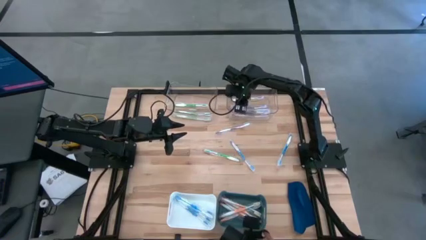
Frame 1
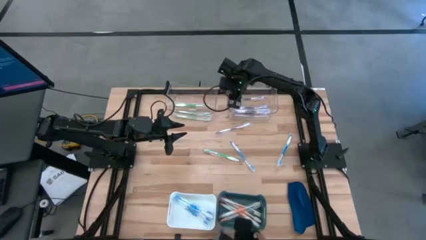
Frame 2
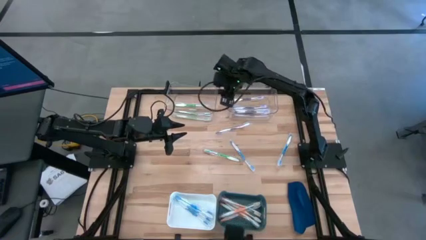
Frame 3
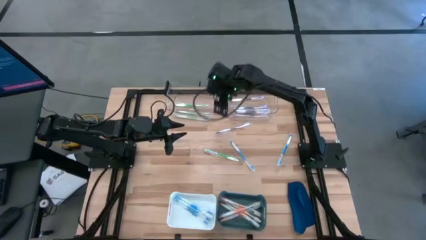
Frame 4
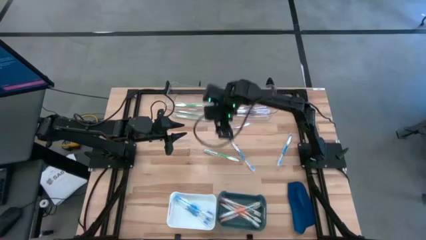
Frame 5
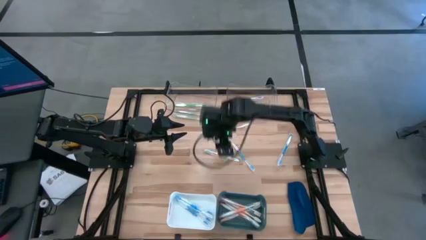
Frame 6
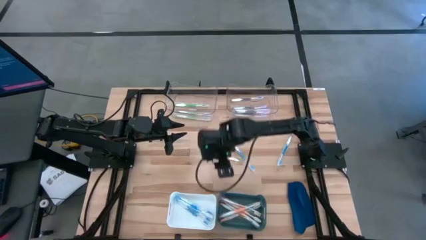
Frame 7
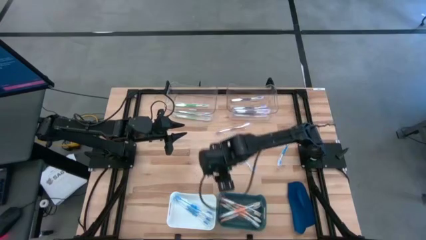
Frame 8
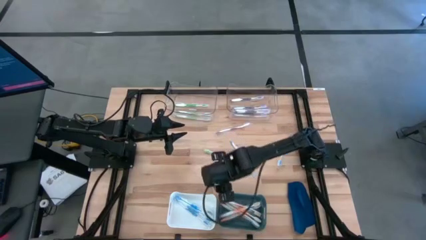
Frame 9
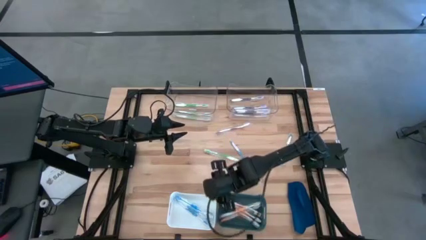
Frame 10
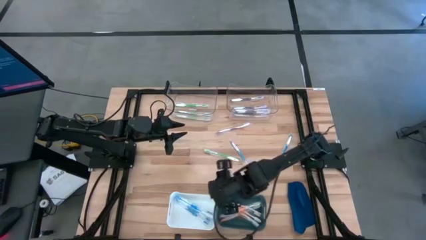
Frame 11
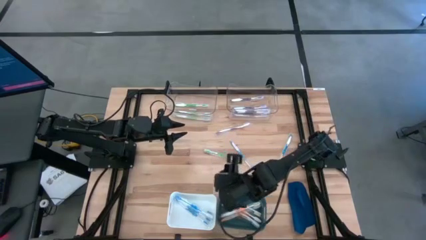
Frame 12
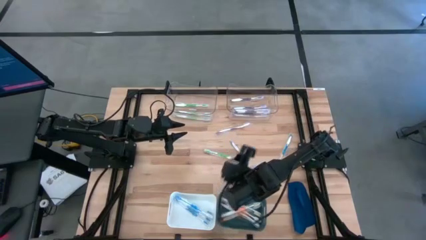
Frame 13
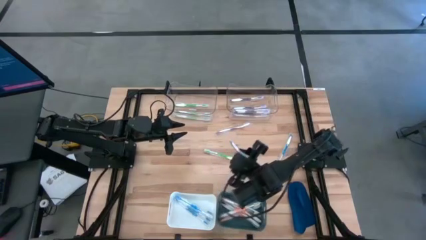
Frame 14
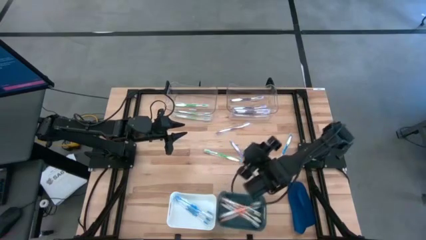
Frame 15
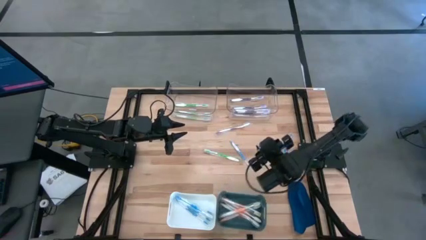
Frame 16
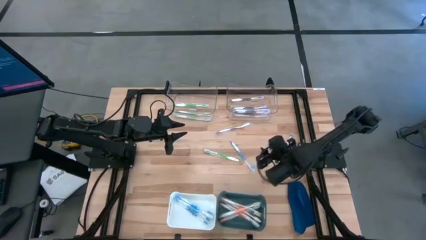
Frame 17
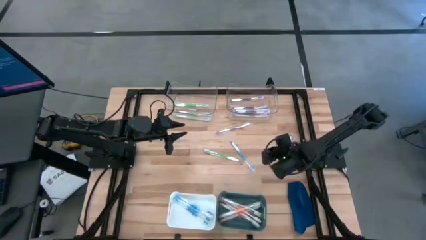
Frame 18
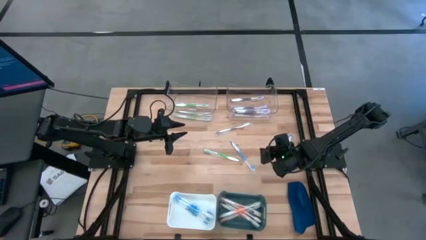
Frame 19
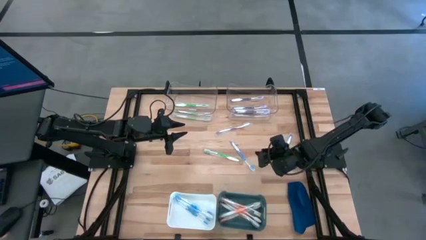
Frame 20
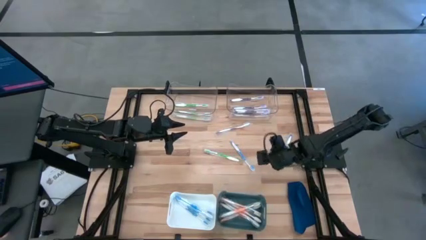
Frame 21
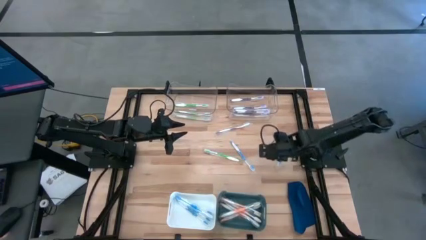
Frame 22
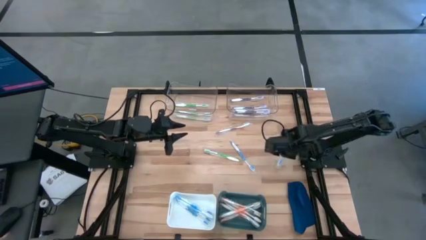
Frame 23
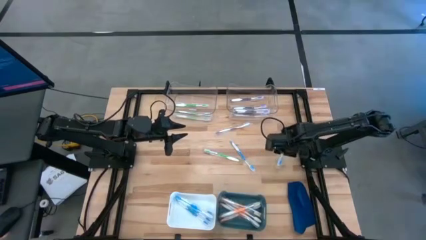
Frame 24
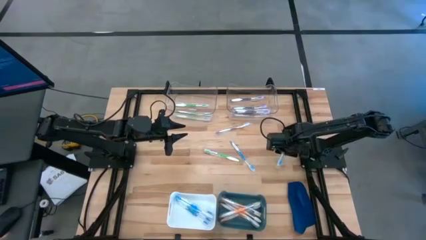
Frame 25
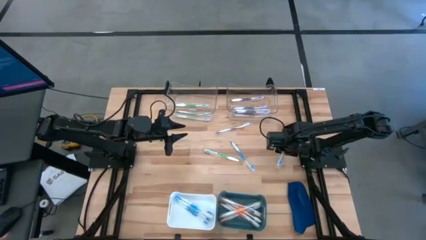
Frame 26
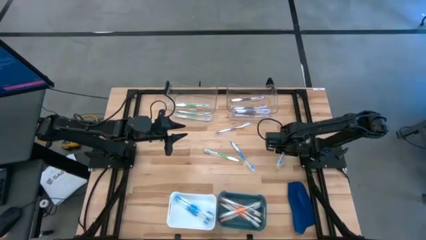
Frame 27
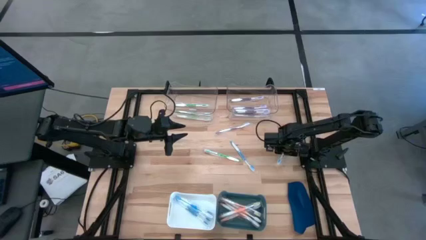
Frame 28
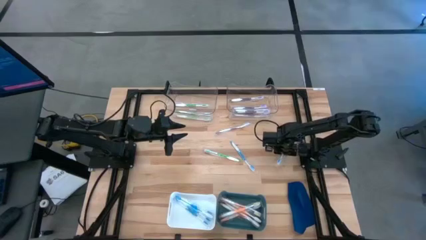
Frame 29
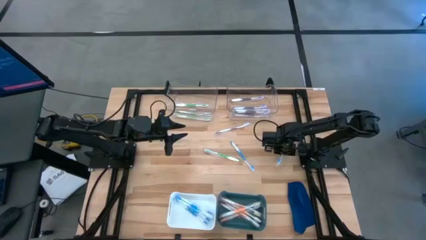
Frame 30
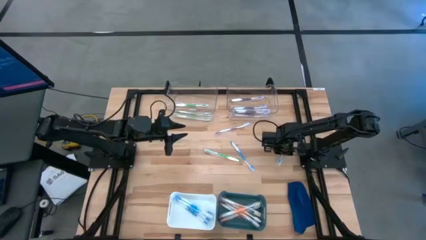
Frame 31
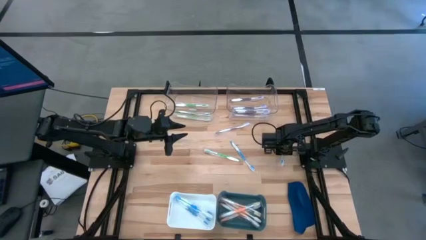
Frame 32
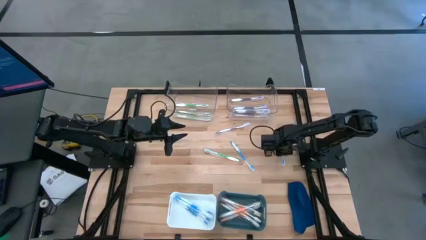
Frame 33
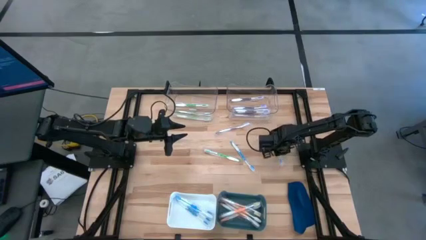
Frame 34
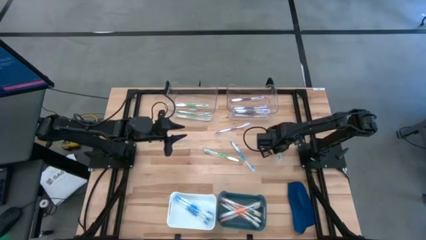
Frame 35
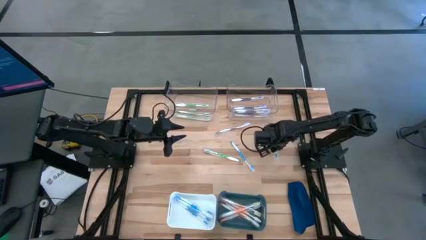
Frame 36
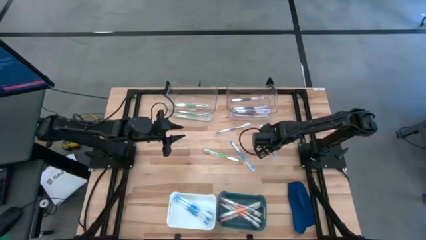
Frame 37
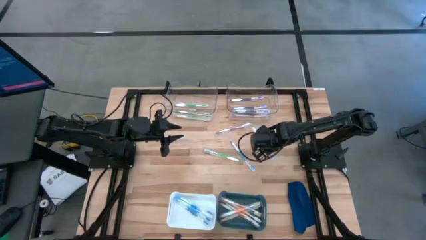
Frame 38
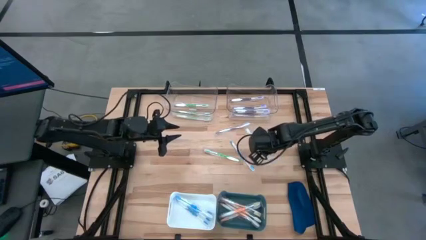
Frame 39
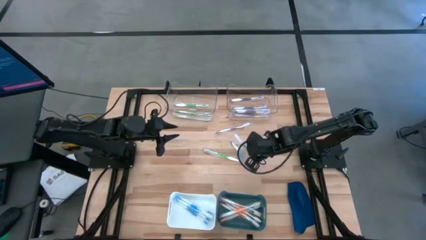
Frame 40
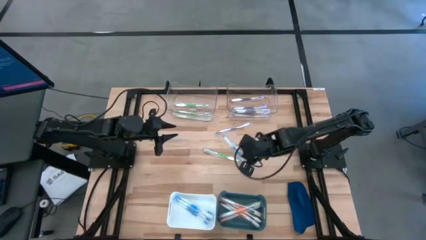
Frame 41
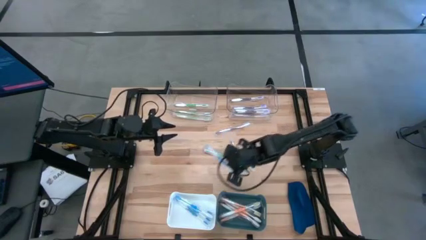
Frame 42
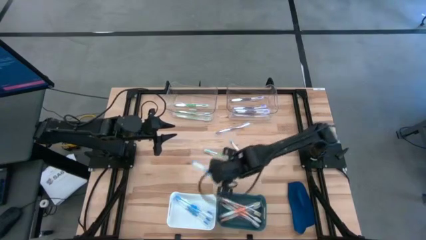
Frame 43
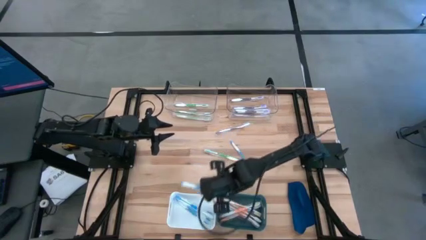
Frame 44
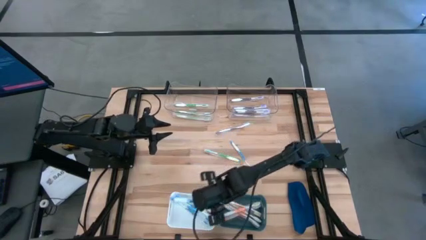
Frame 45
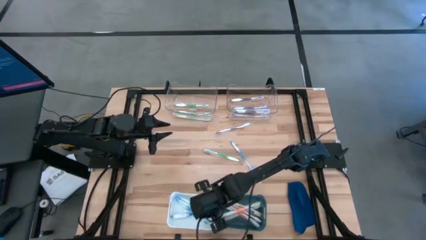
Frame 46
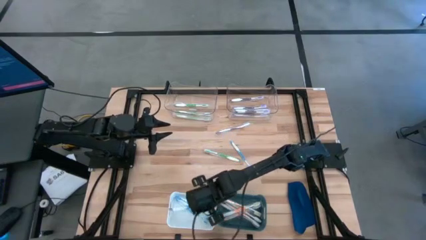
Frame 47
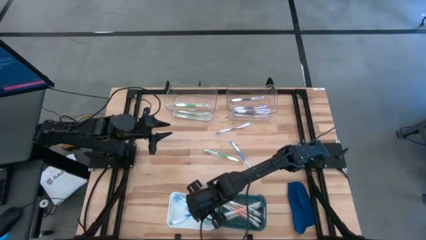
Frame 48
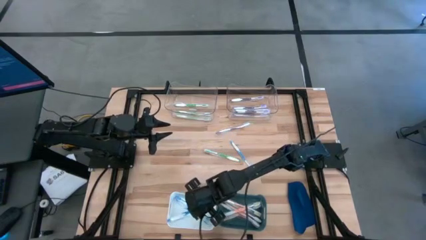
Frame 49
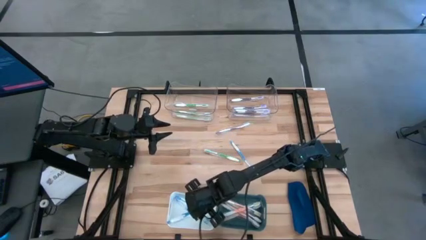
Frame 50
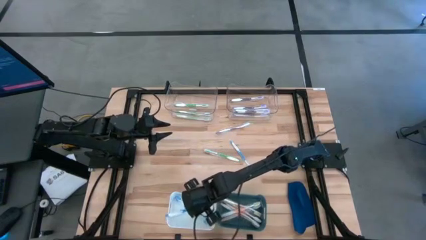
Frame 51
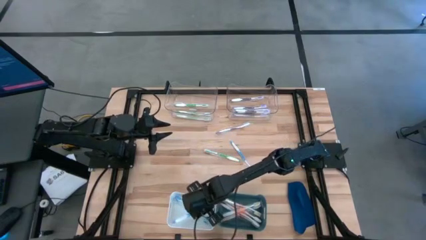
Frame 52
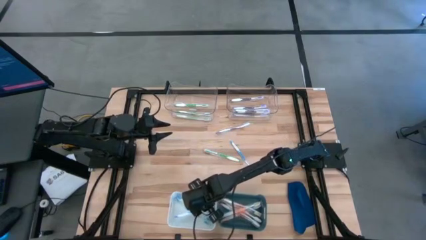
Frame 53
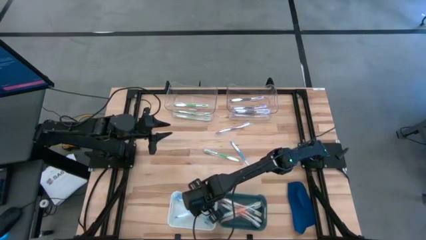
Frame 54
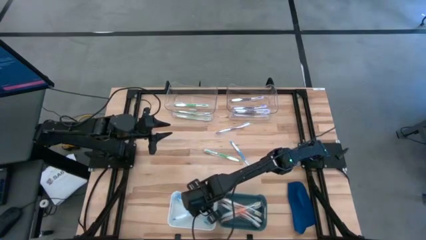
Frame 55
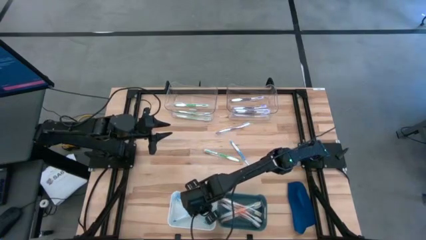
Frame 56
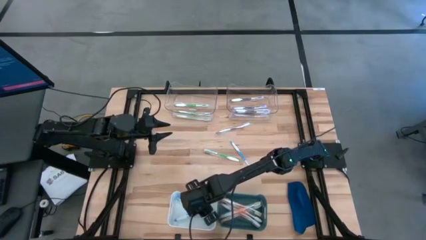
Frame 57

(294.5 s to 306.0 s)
Task: Pick & Place Toothbrushes
Put the blue toothbrush into the white bin

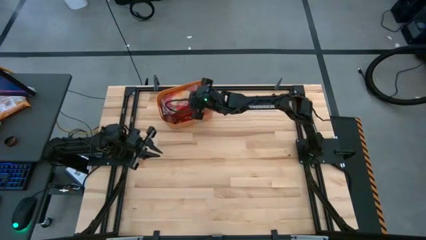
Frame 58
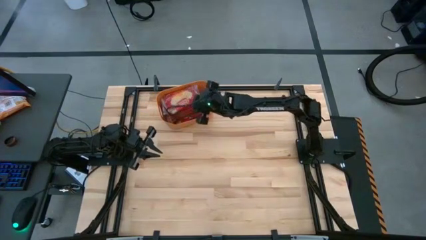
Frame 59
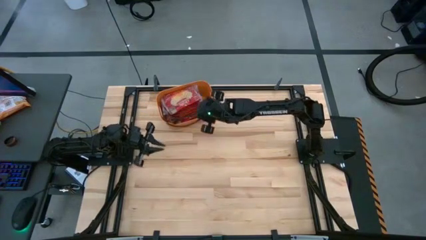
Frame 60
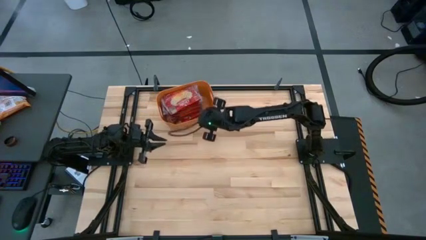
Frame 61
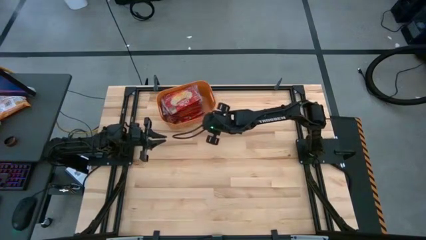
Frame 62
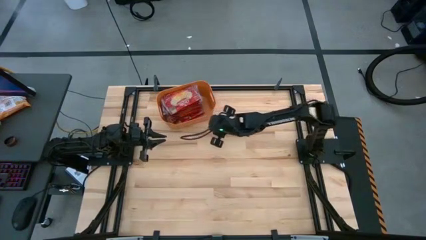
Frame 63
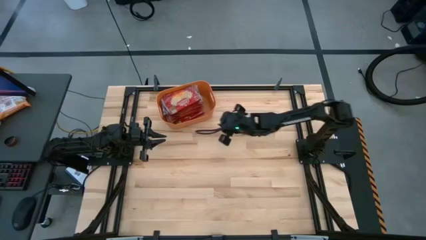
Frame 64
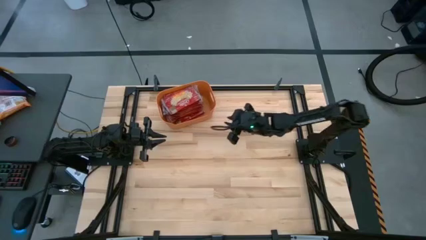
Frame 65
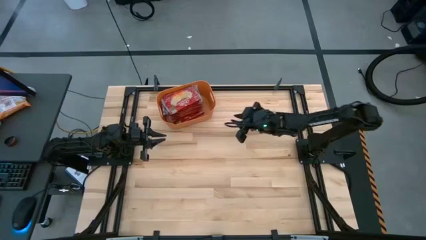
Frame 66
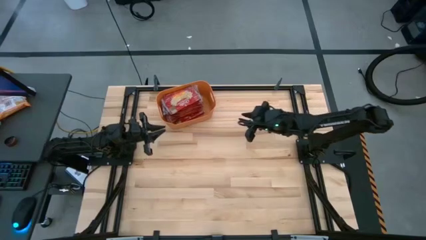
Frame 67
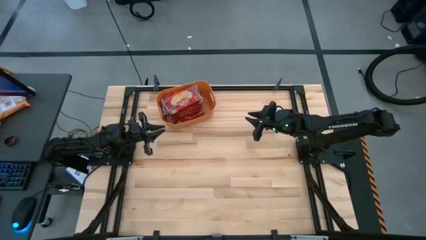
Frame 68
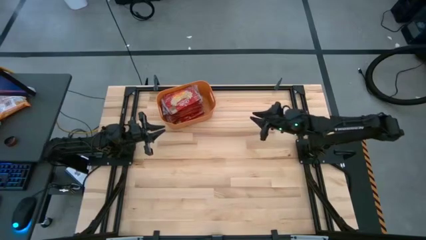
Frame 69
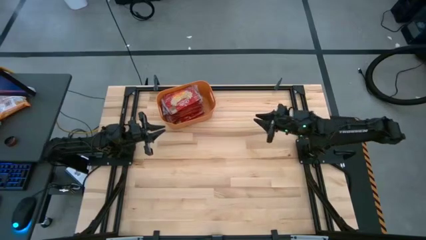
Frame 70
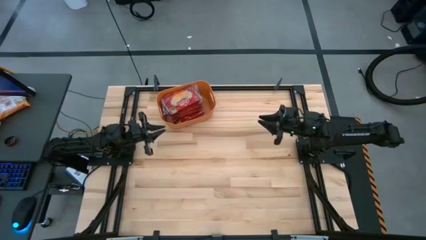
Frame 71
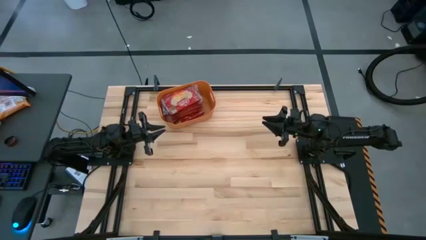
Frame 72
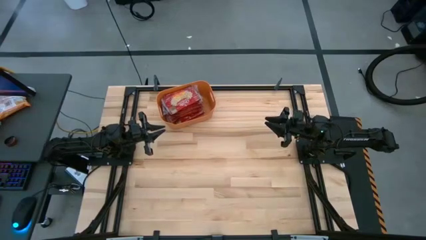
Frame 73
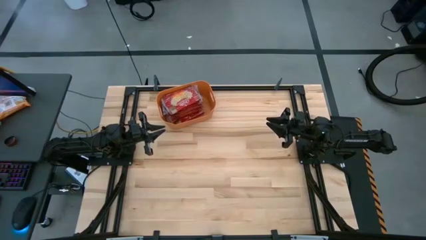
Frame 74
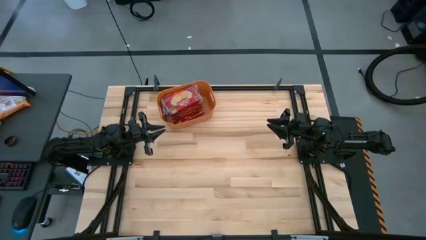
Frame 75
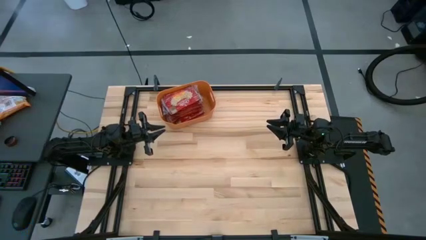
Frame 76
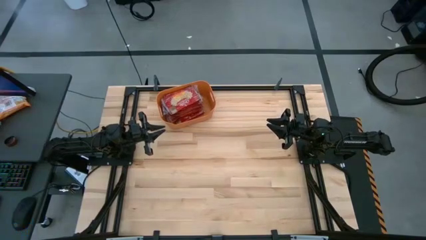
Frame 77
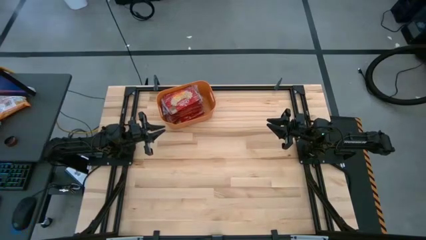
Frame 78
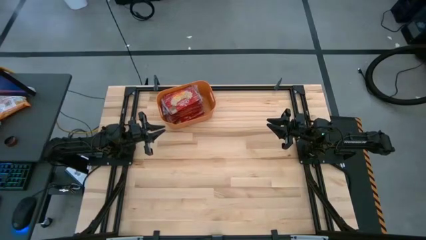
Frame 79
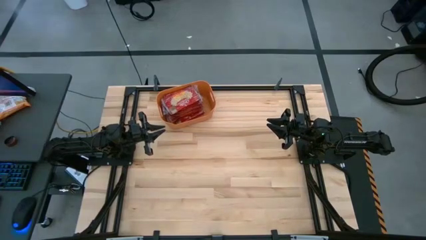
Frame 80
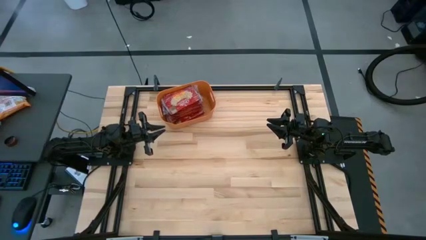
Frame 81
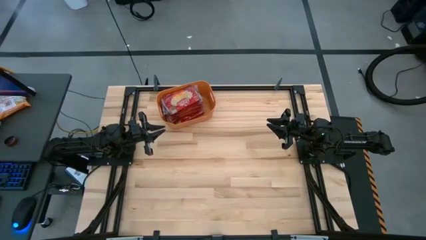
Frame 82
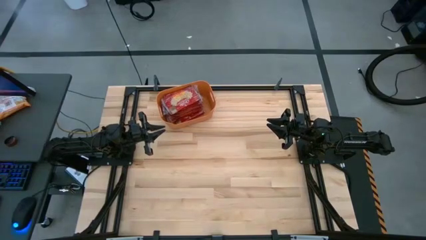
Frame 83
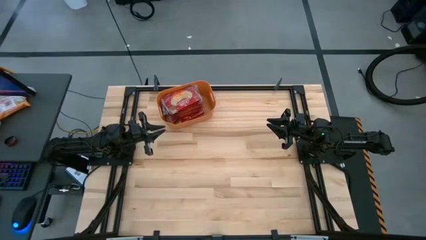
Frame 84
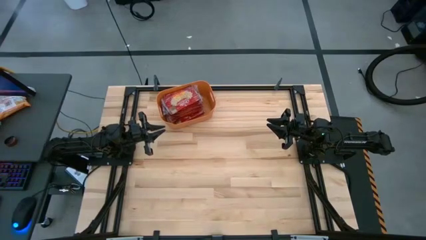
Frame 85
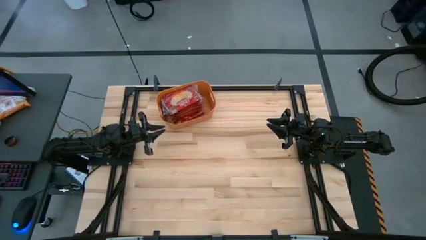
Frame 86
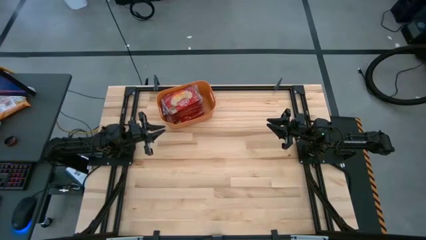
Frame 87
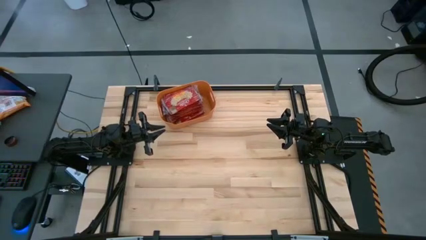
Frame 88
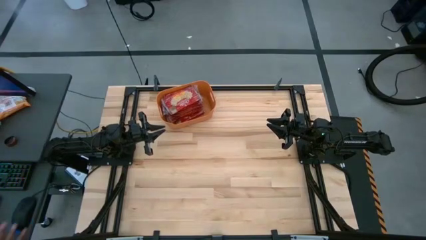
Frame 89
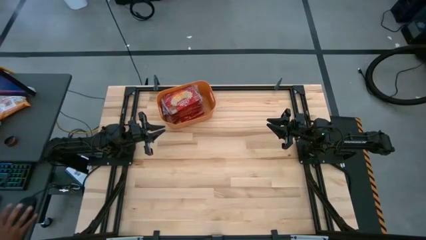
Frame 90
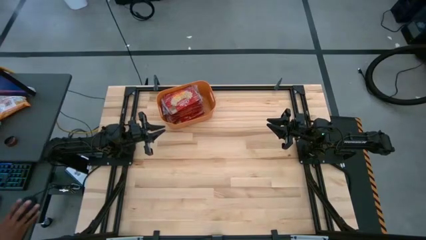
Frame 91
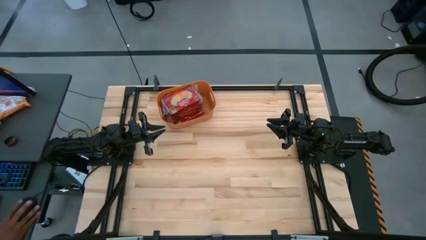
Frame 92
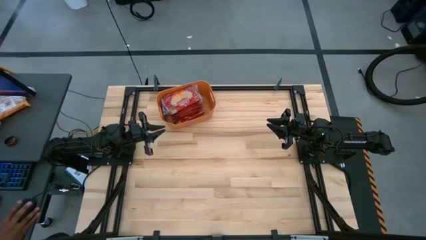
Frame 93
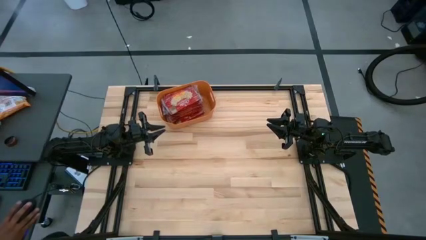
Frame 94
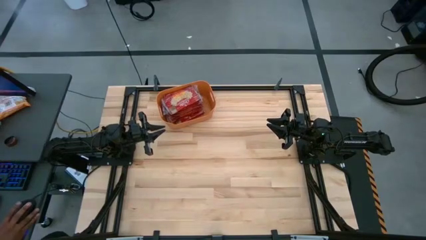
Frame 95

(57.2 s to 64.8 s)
Task: Sort popcorn bags into baskets
Return to home position
